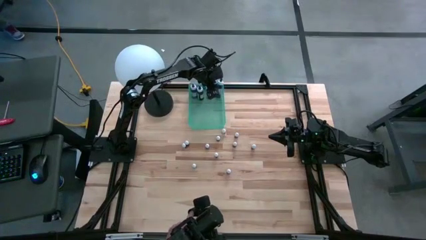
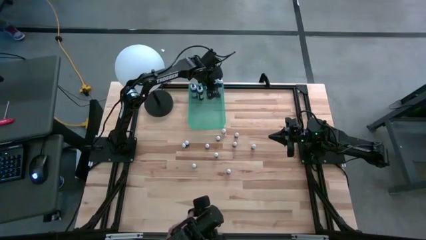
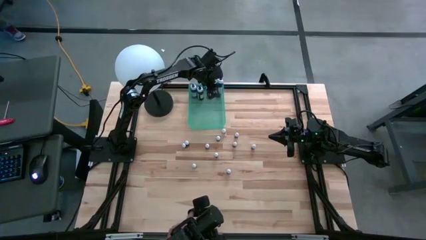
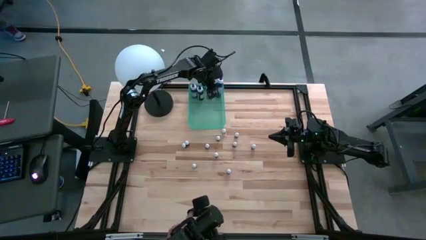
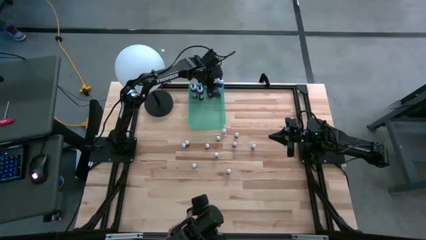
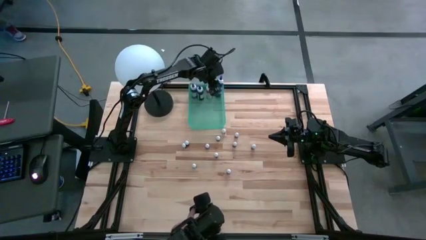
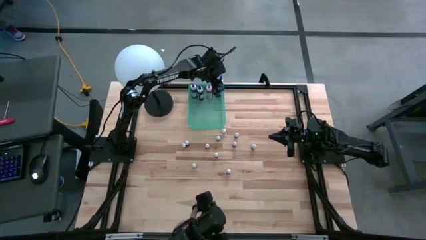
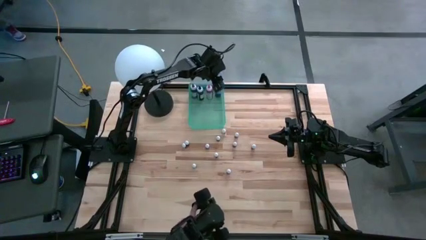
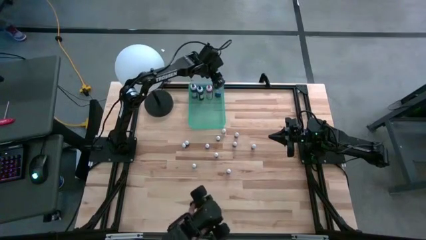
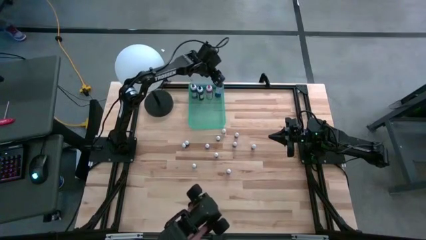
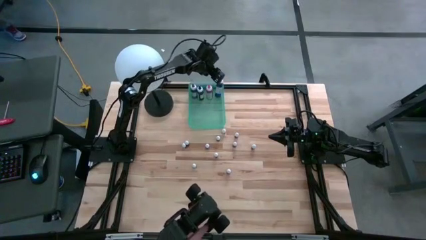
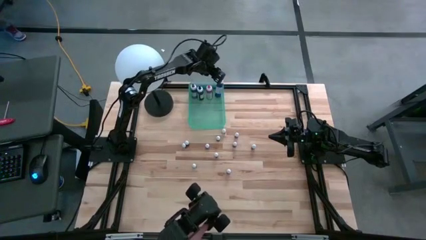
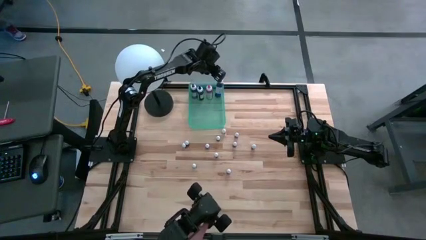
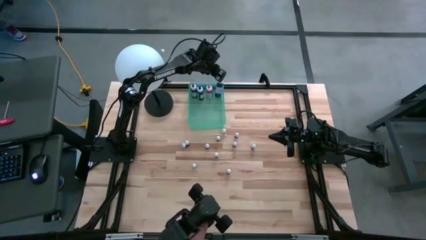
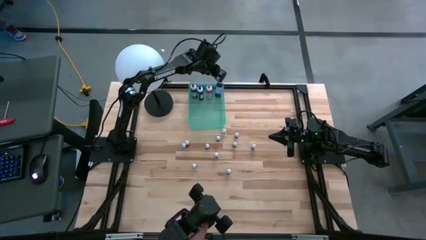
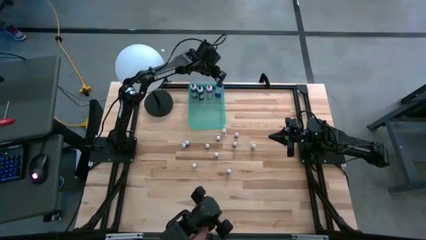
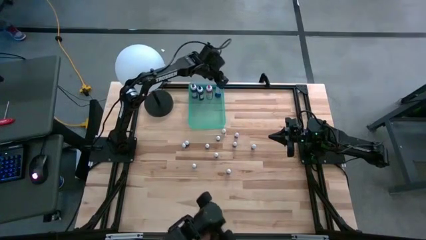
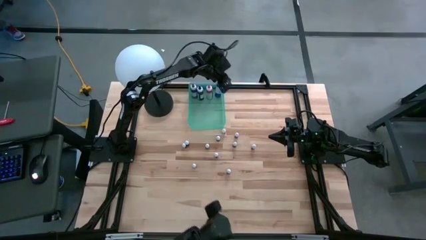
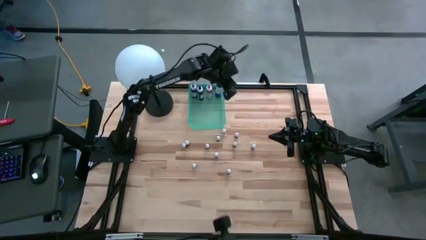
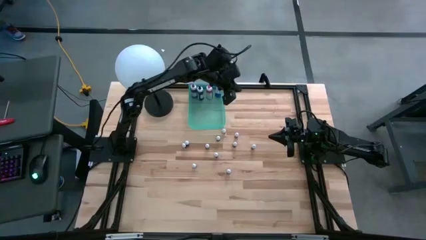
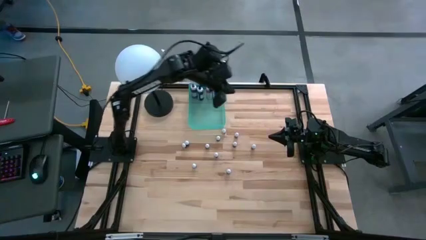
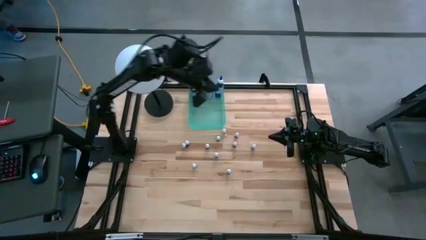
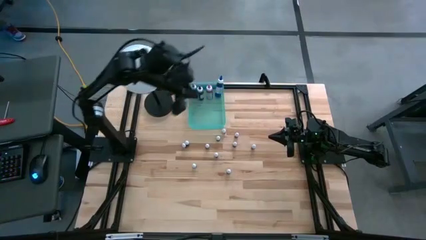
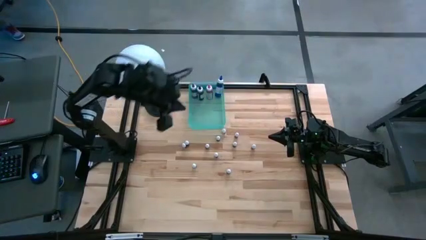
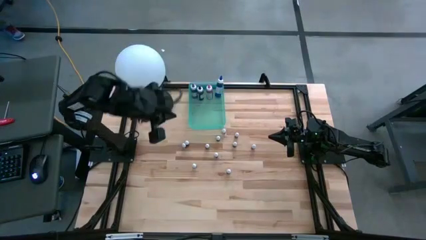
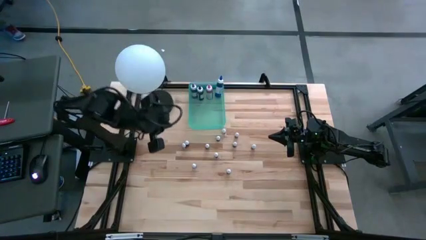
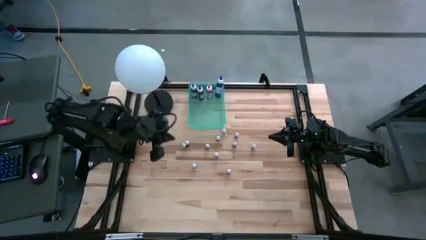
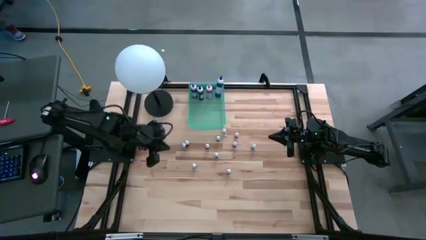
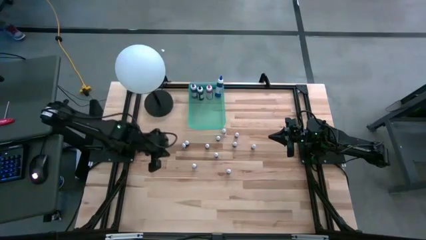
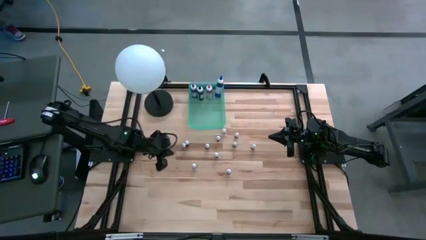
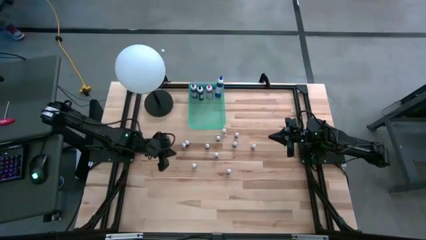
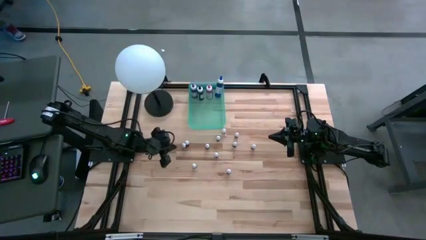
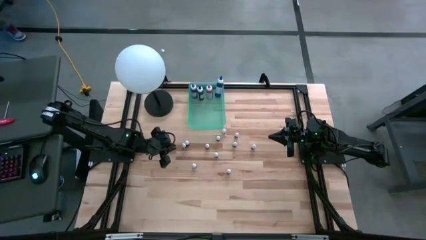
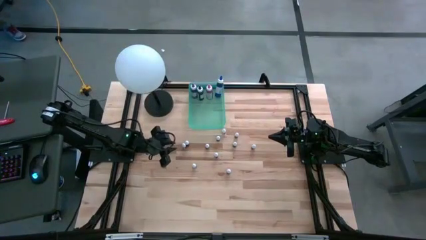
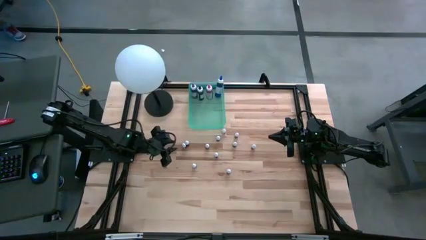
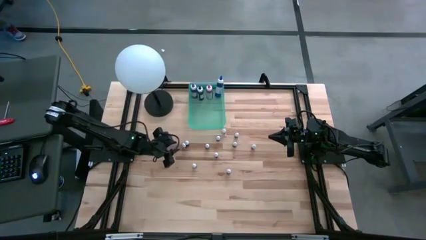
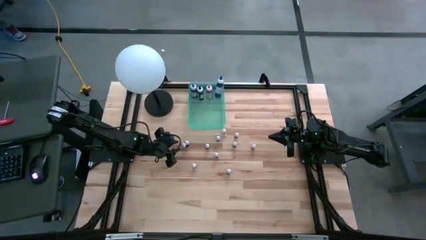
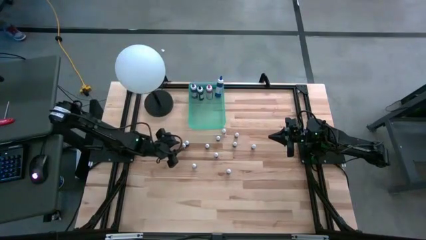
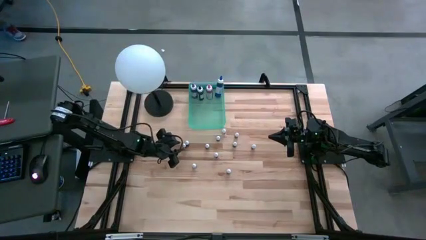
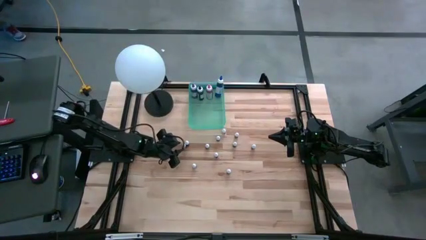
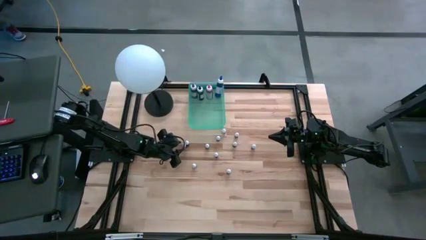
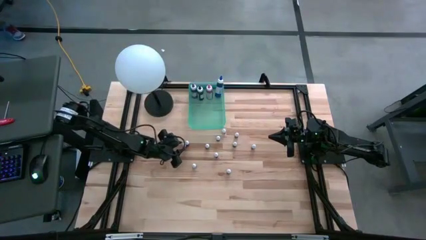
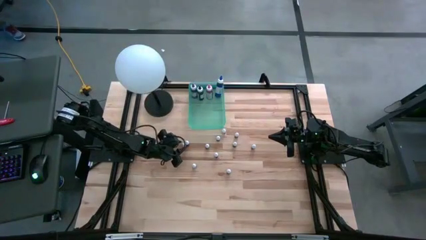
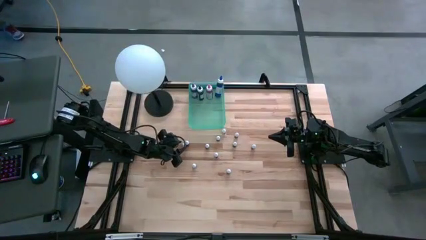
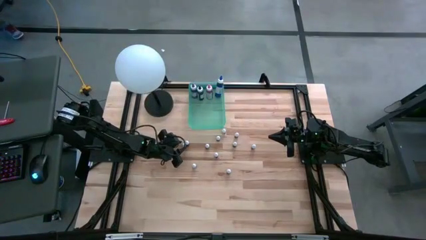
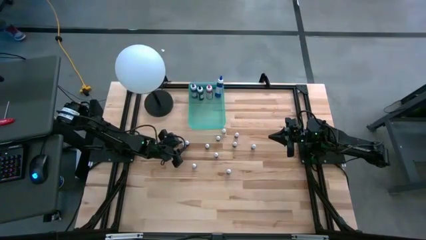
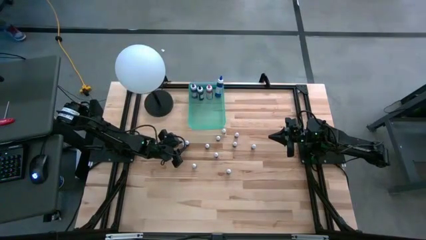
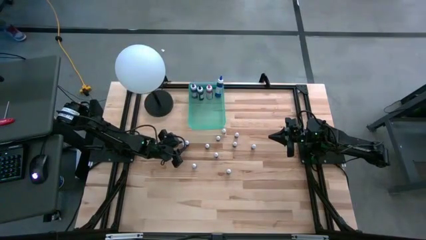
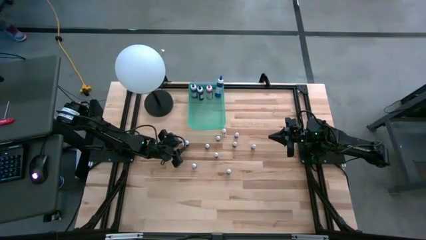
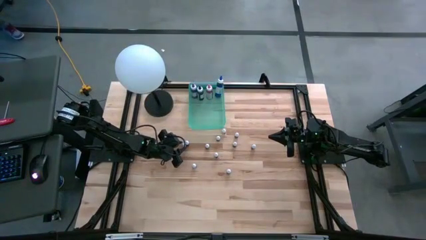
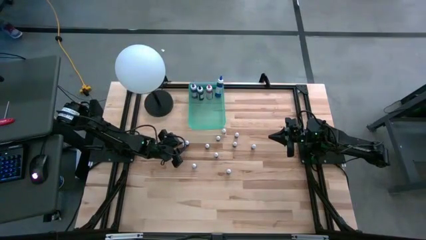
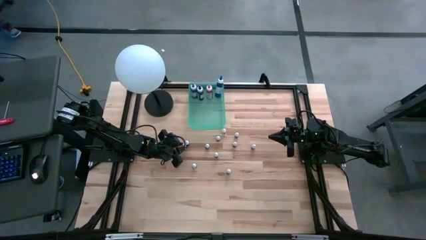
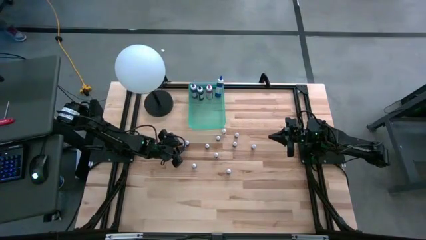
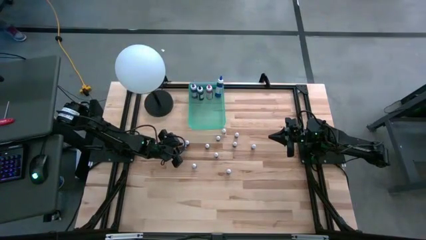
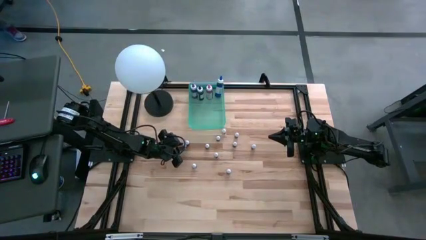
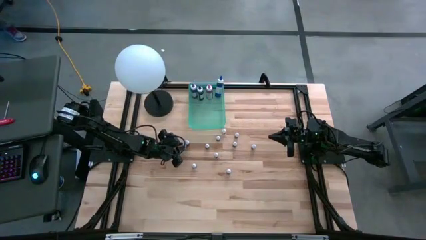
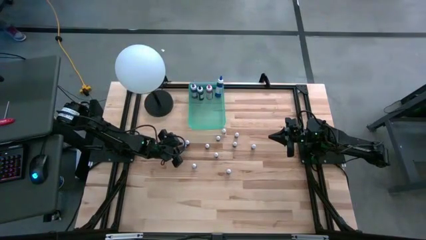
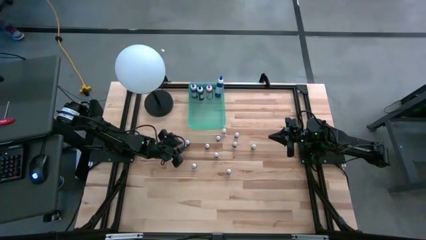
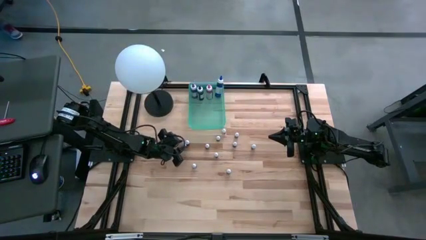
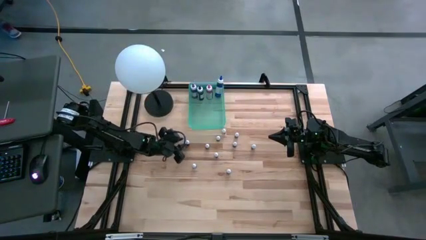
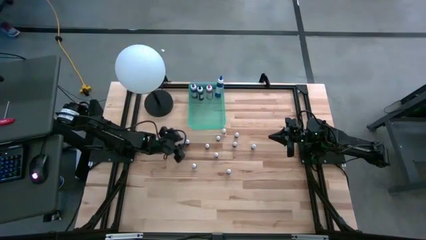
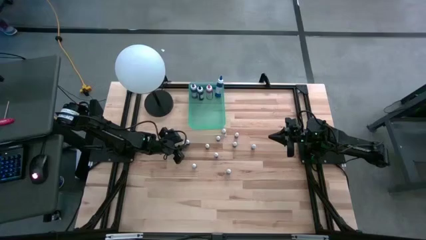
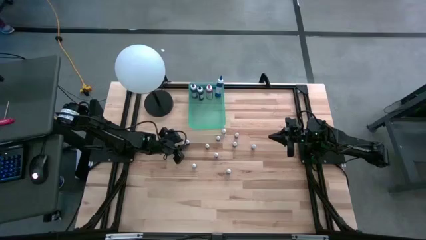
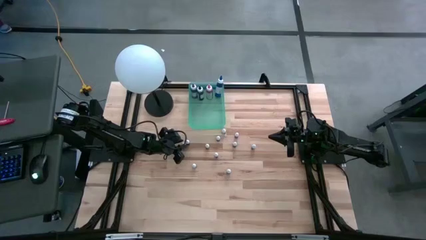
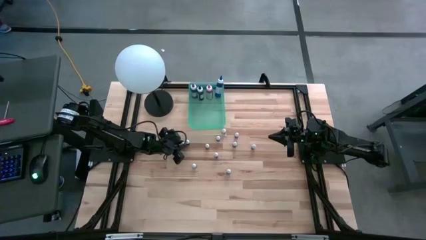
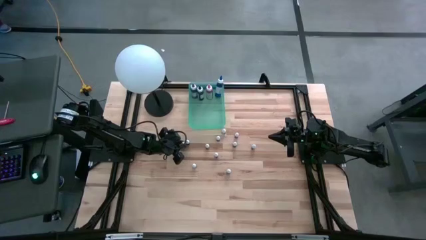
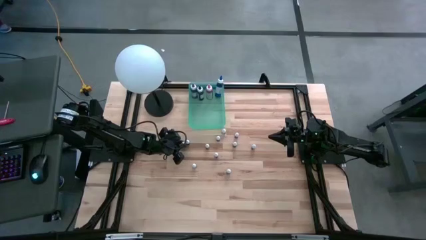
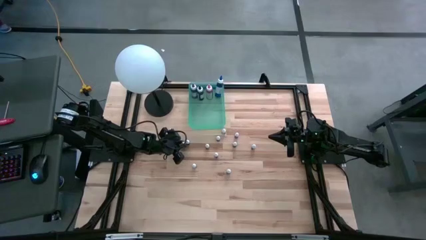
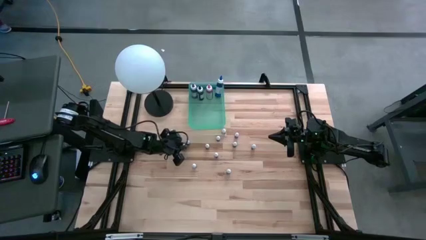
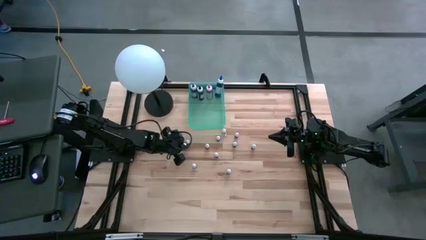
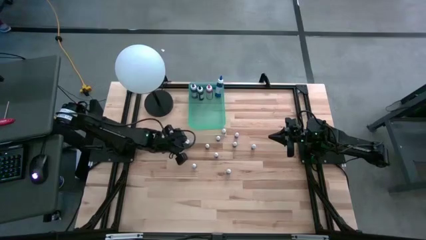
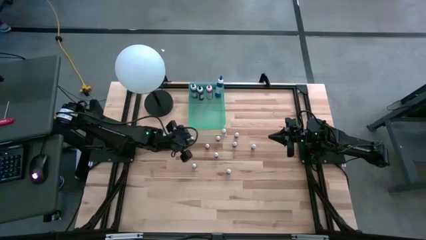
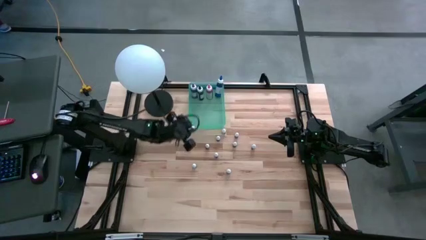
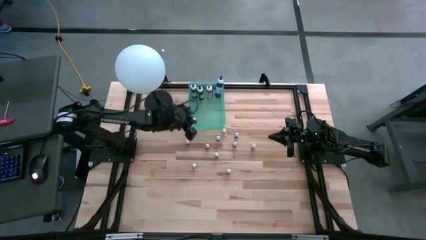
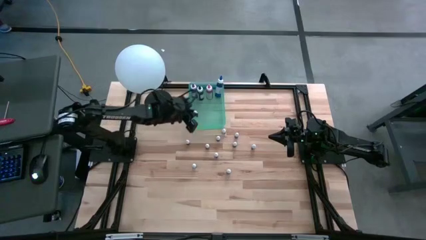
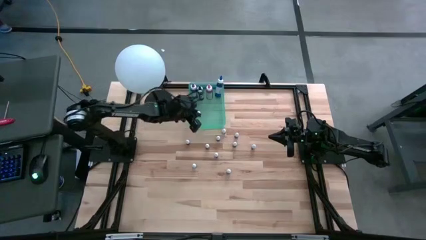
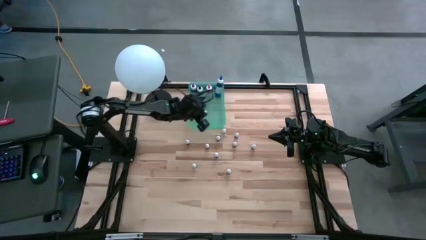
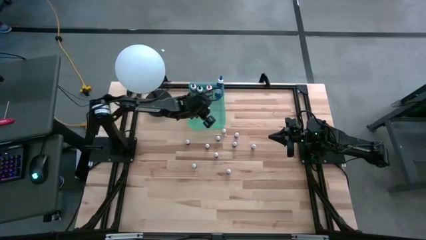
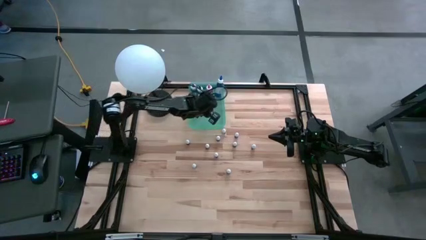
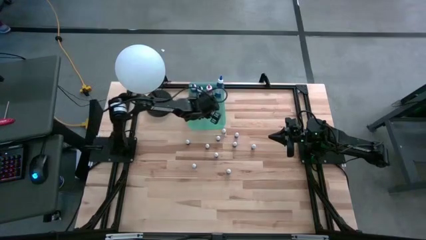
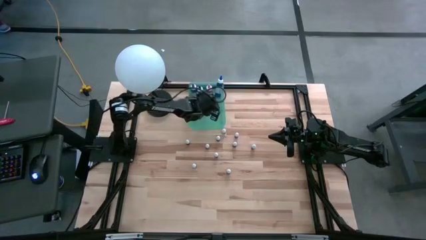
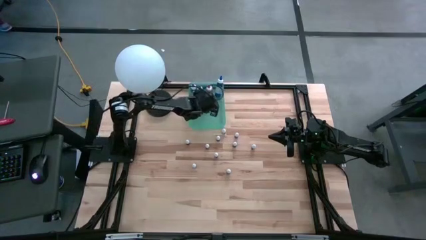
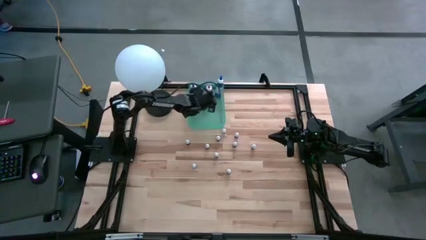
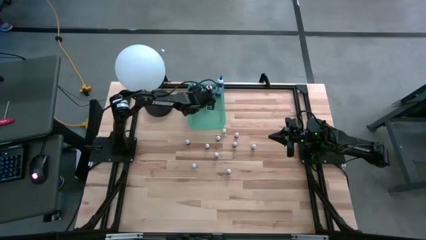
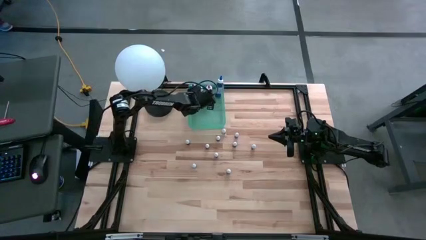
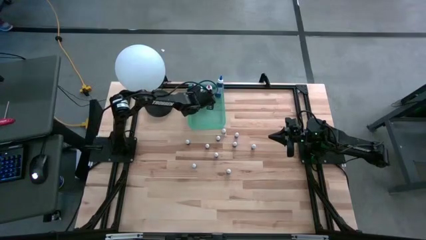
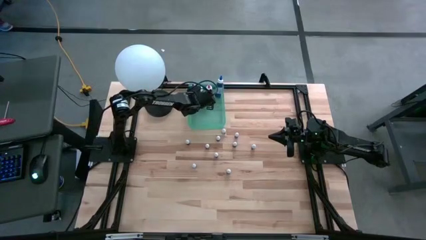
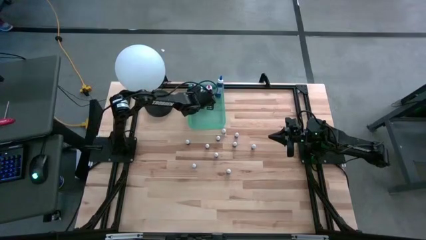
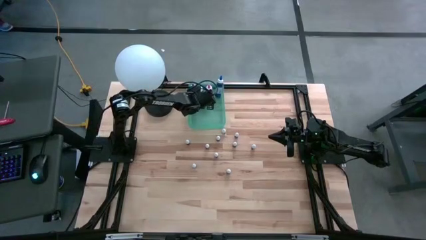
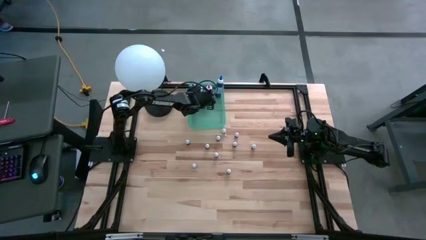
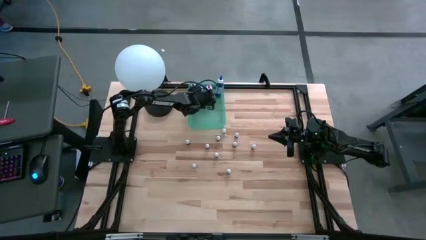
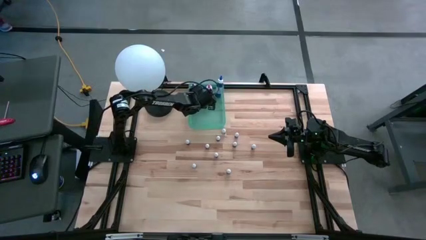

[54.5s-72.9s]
Task: Pick & Place food coloring
Put the small black food coloring bottle into the blue bin
